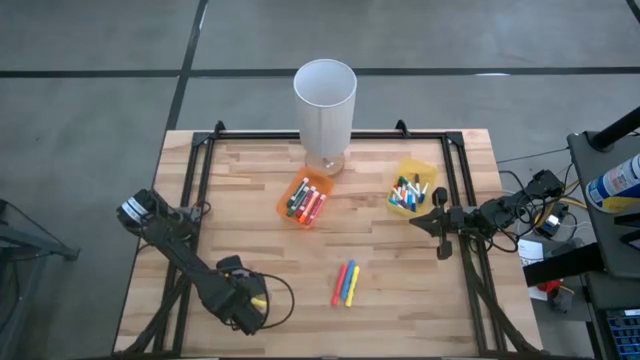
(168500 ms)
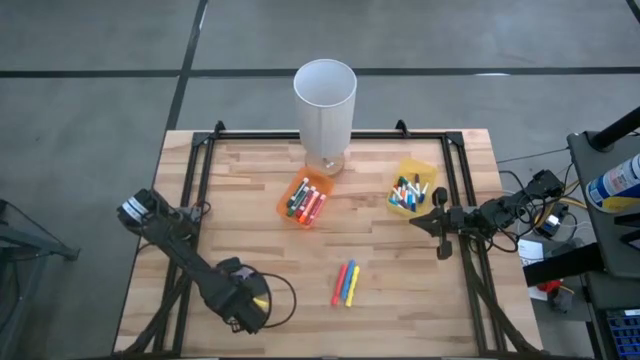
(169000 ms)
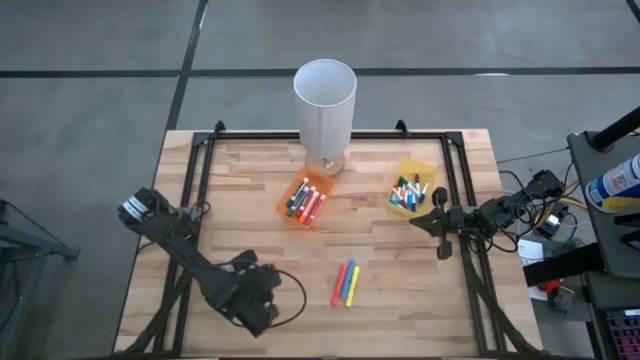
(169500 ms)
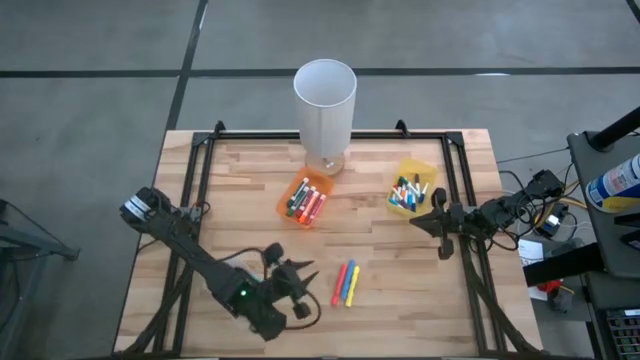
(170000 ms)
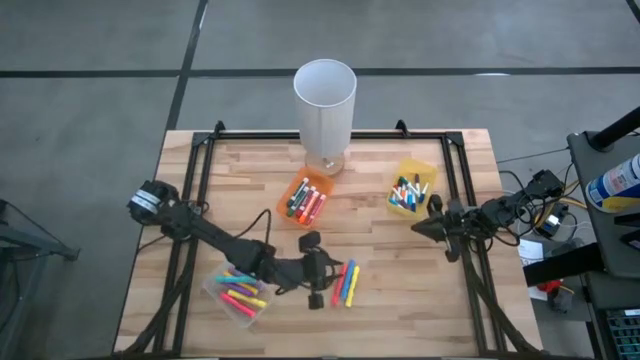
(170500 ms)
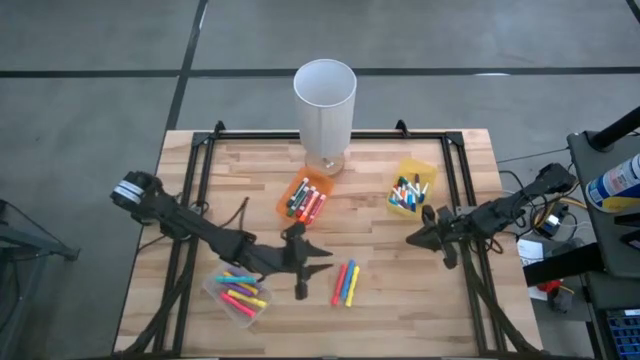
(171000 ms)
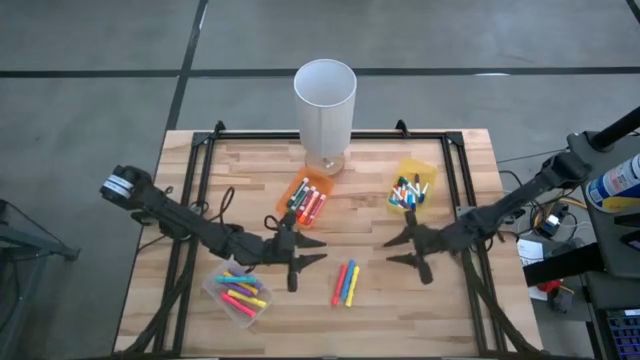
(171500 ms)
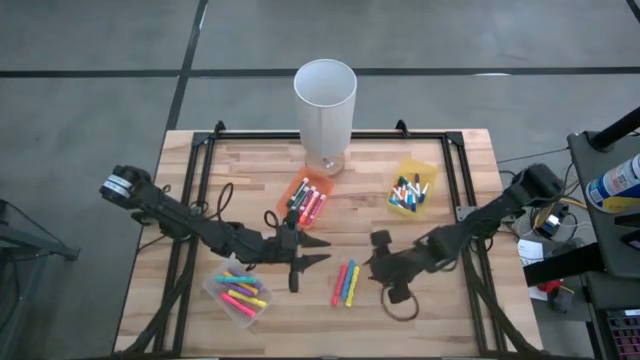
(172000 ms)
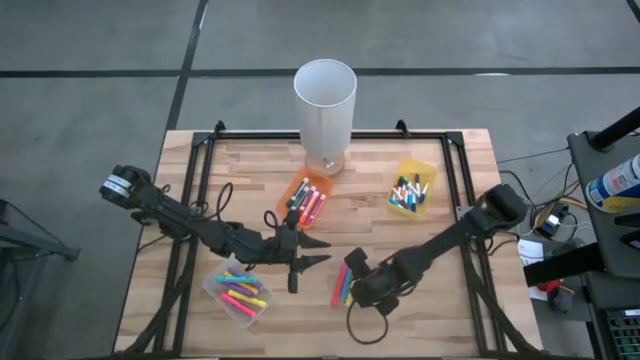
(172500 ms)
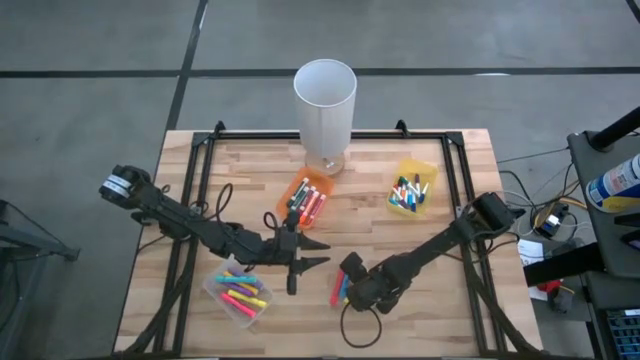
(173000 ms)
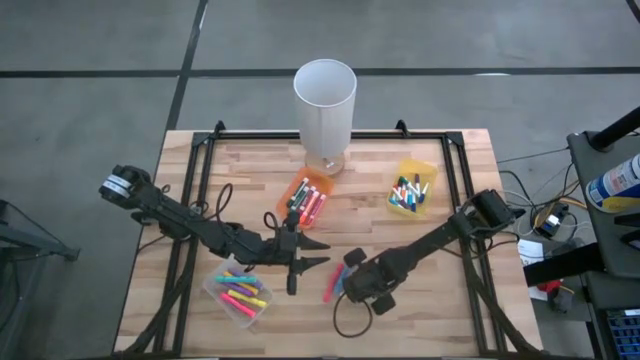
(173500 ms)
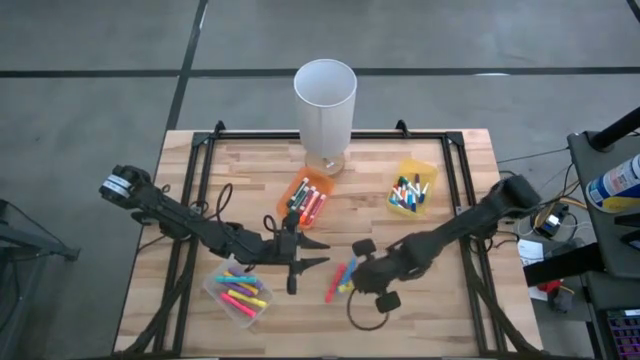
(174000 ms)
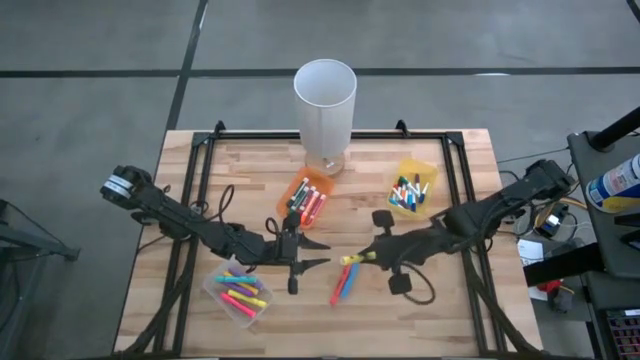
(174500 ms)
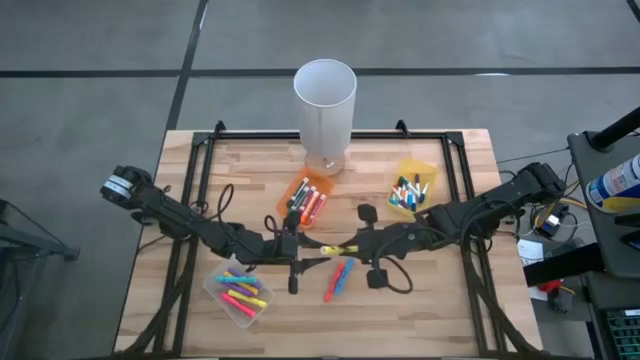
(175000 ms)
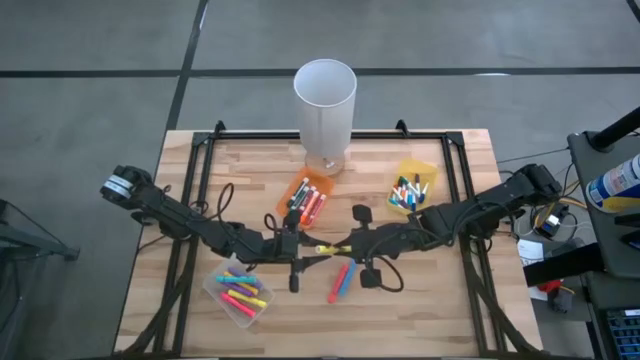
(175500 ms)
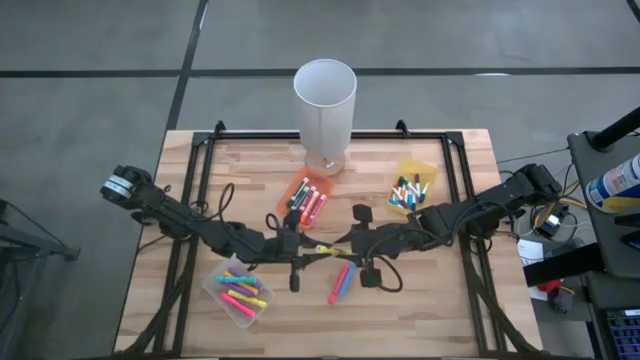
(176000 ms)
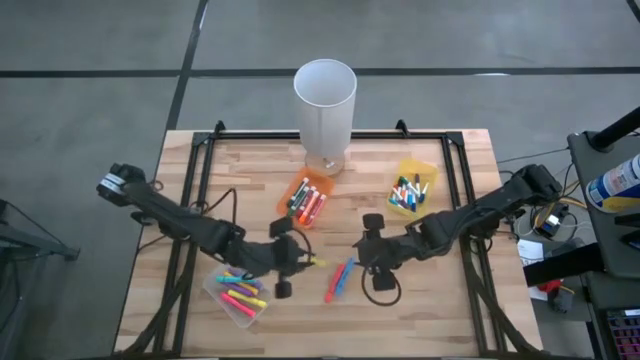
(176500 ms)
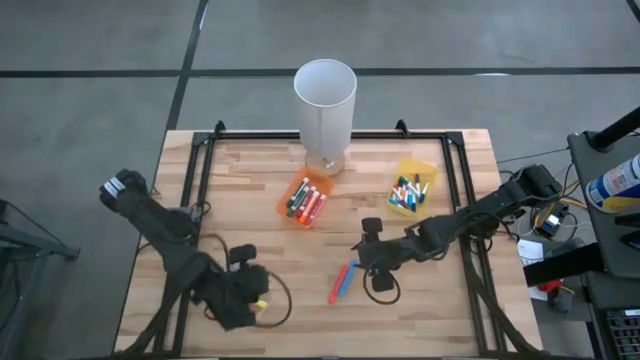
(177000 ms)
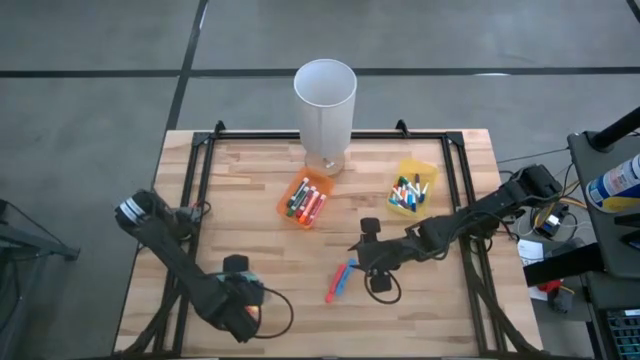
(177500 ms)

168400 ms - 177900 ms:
Task: Pick & Place Markers
Put the light yellow highlighter pen into the white bin

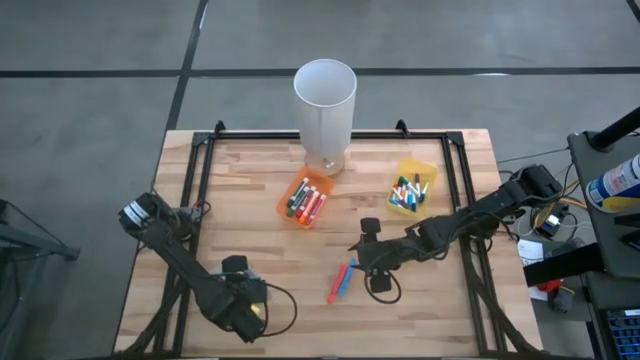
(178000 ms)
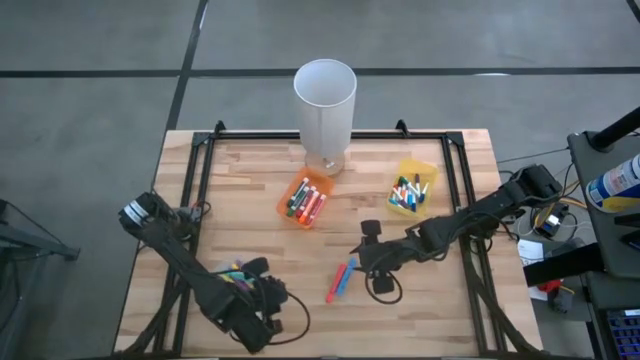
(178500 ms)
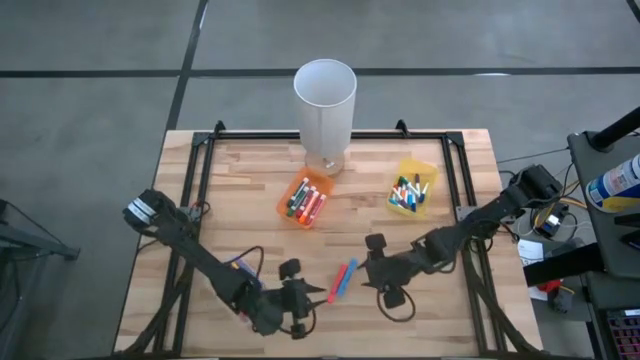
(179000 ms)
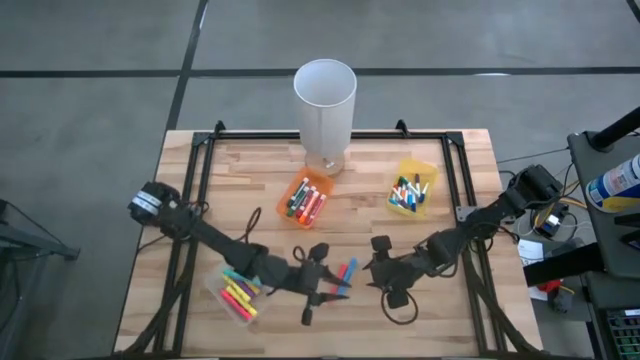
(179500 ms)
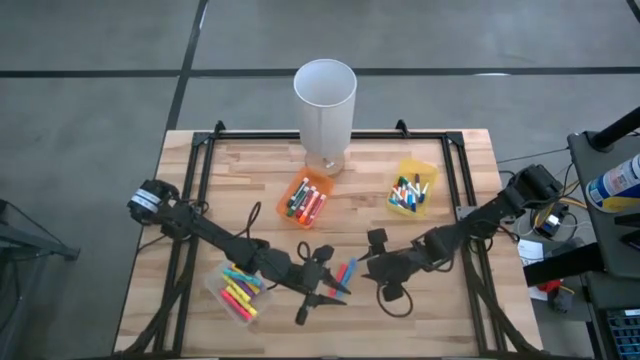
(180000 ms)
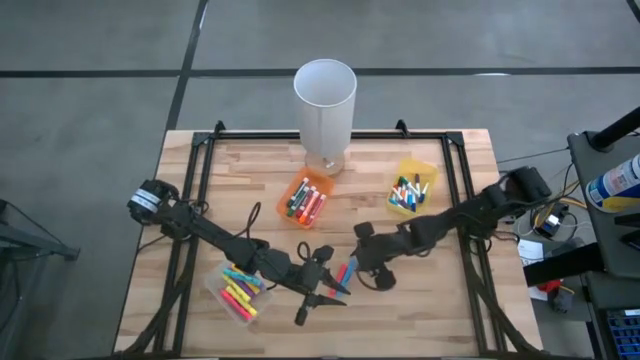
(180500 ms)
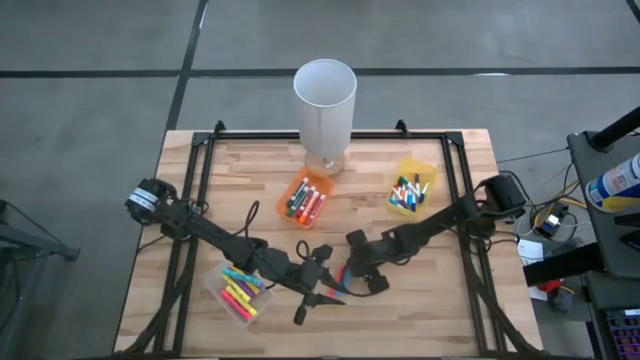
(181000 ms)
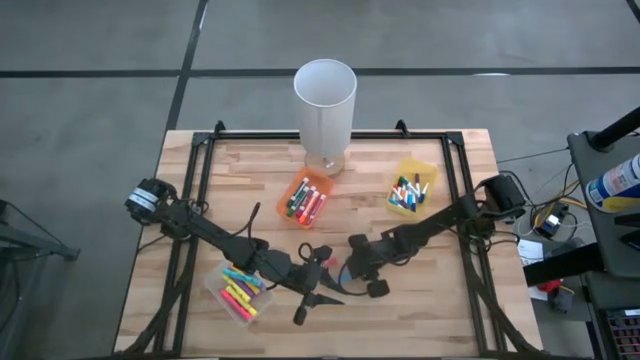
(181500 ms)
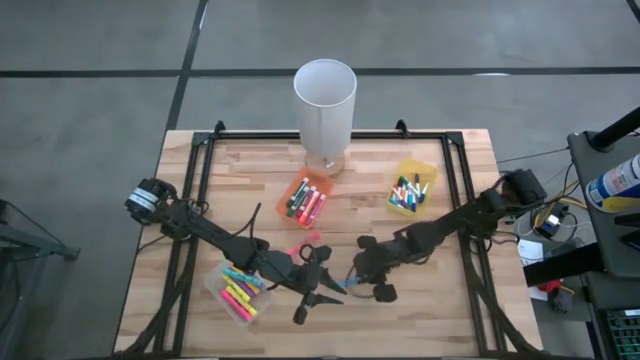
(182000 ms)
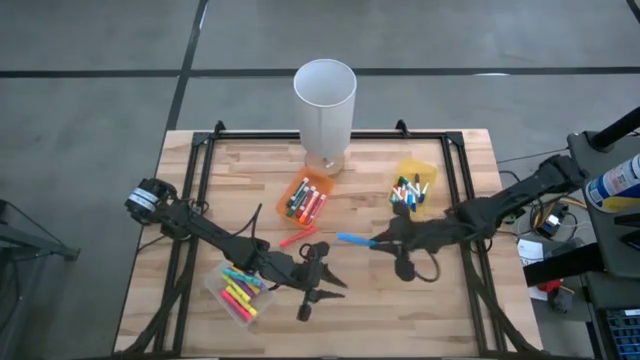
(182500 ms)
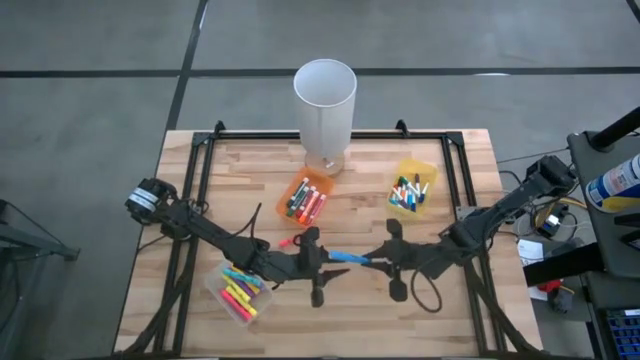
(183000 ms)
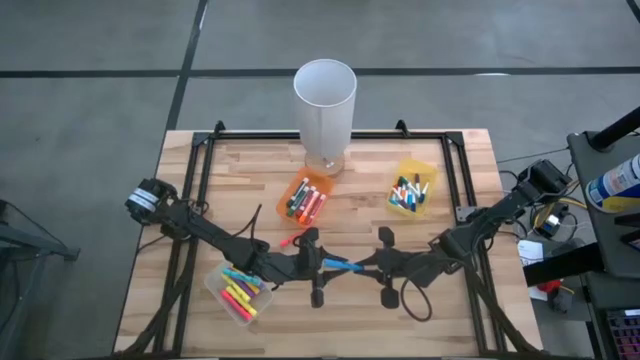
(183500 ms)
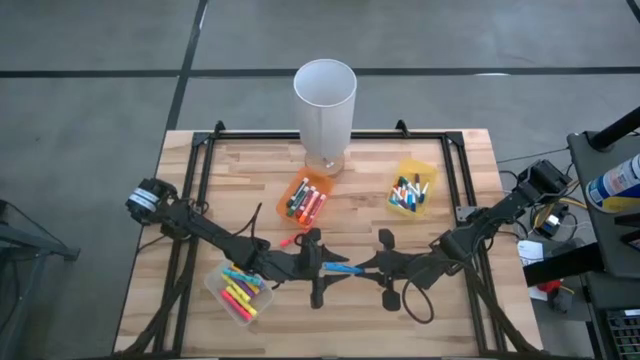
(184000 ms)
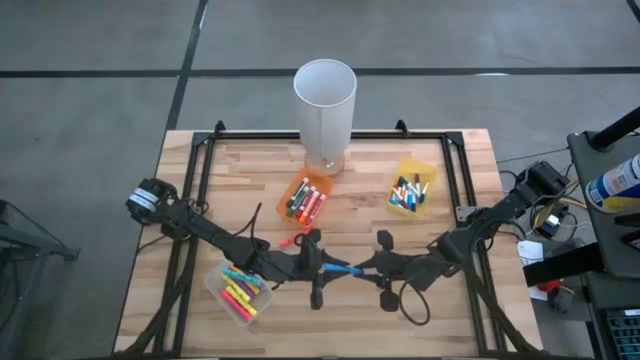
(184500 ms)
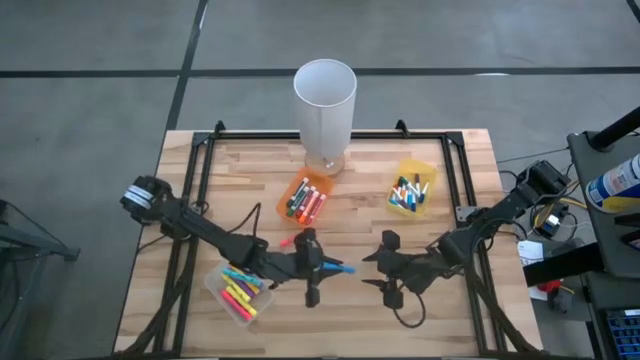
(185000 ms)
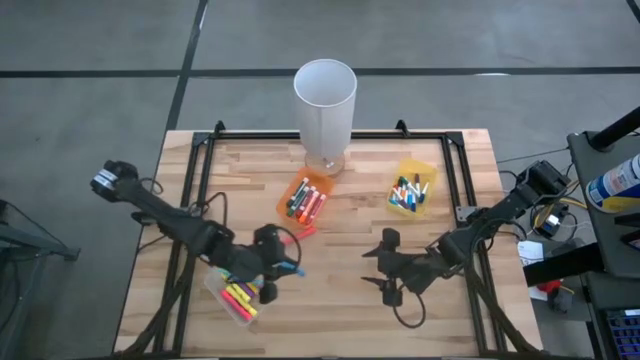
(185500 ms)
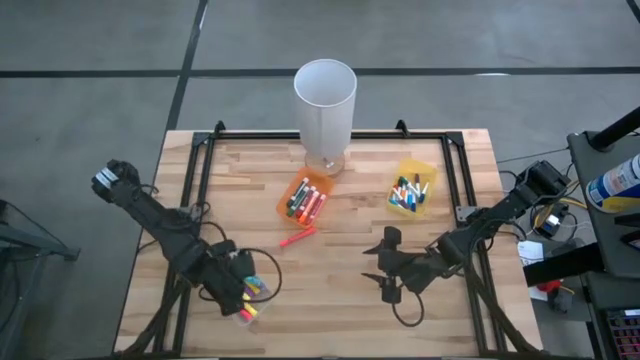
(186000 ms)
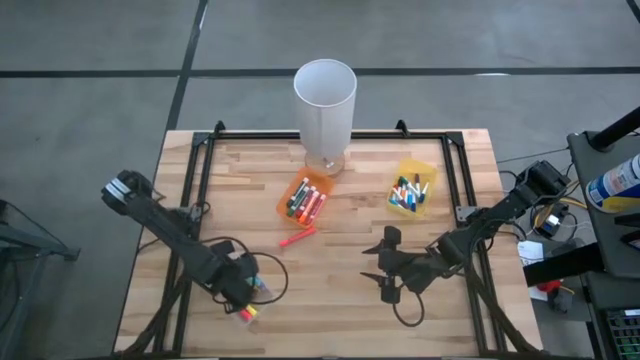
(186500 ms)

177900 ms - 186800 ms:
Put the blue highlighter pen into the white bin

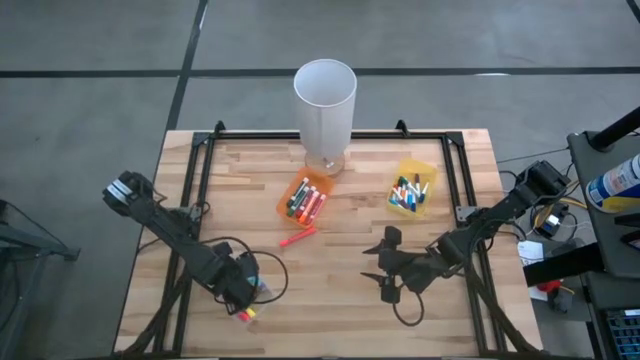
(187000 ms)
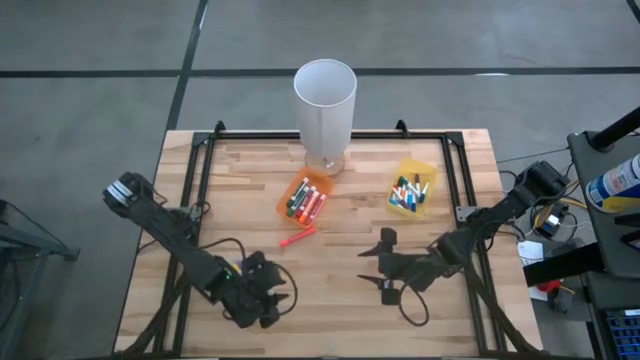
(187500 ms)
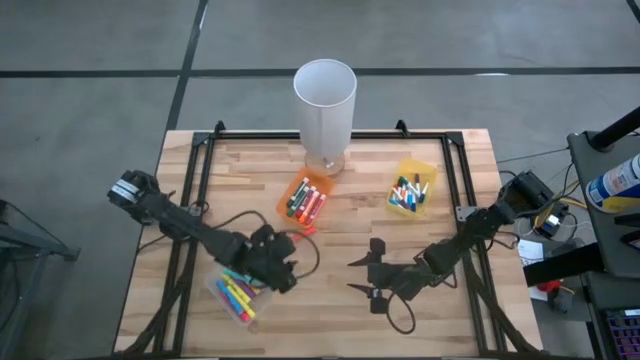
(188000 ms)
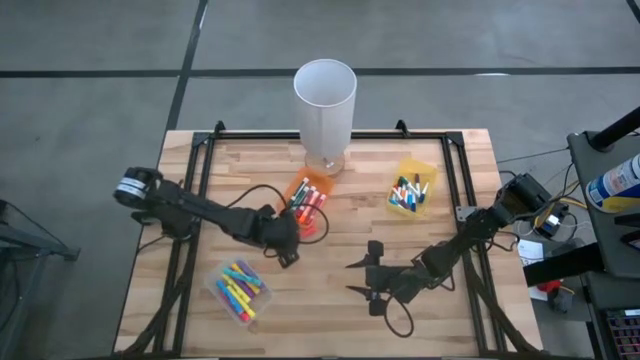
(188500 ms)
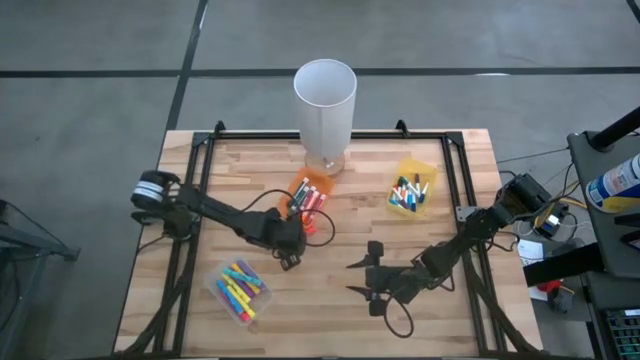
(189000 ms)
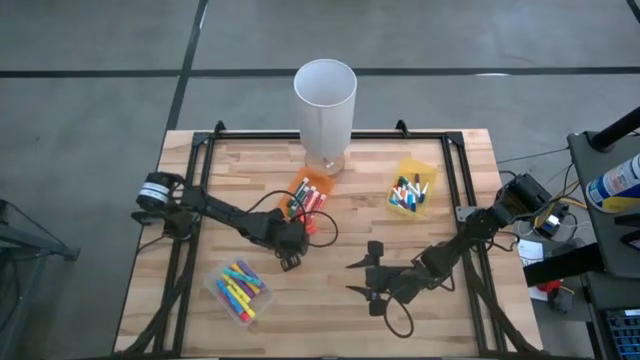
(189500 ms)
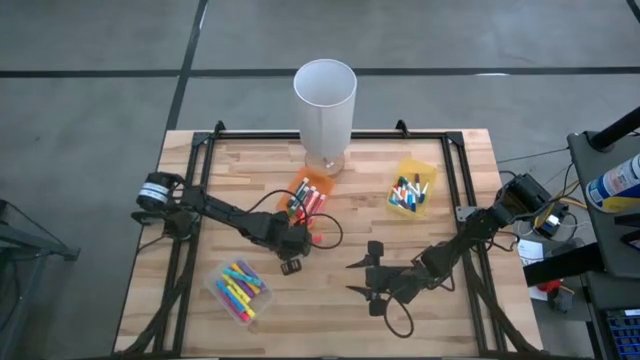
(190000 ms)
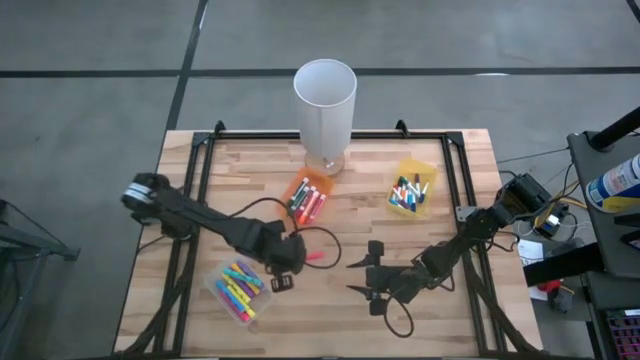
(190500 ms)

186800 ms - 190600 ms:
Put the dark pink highlighter pen into the white bin
